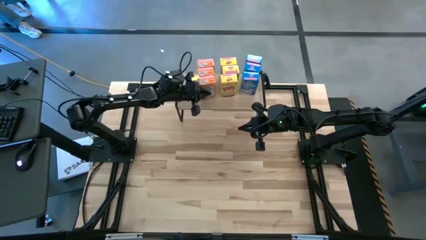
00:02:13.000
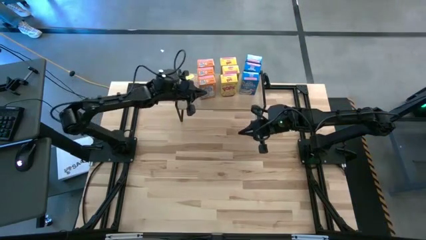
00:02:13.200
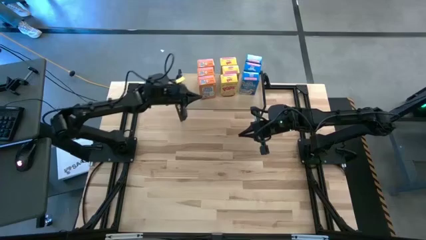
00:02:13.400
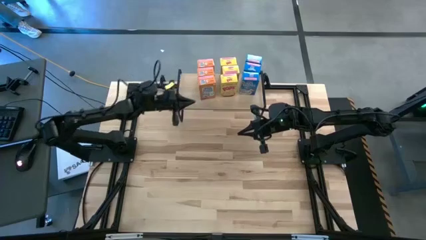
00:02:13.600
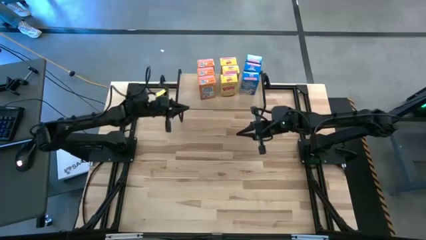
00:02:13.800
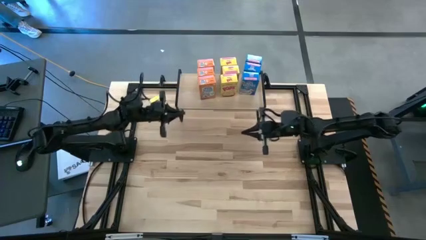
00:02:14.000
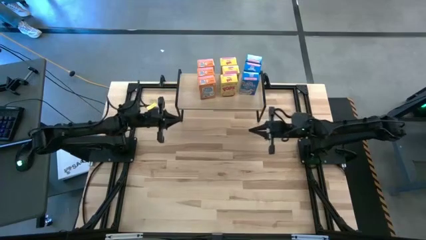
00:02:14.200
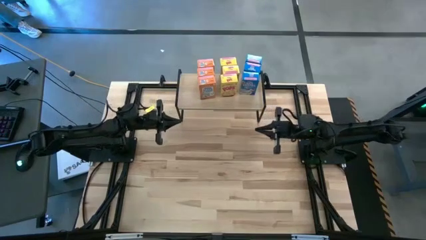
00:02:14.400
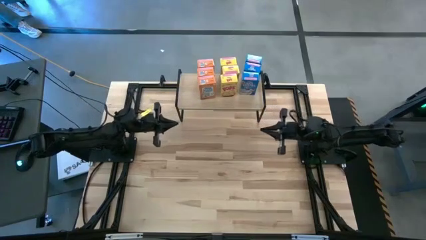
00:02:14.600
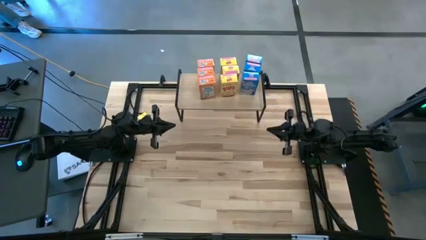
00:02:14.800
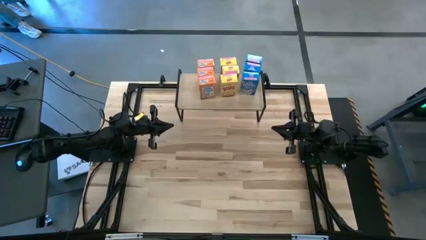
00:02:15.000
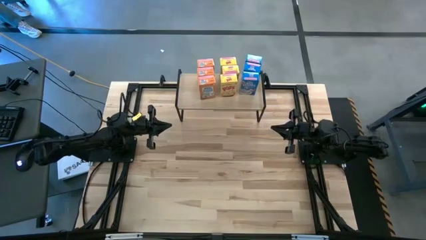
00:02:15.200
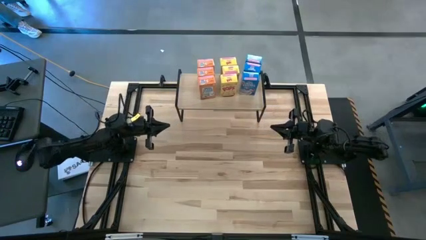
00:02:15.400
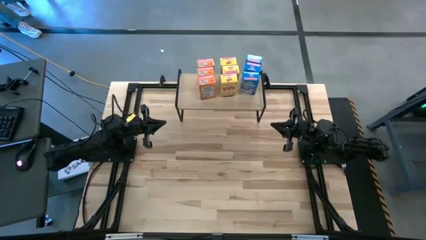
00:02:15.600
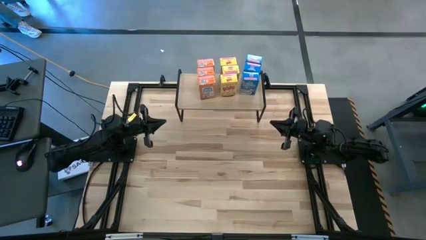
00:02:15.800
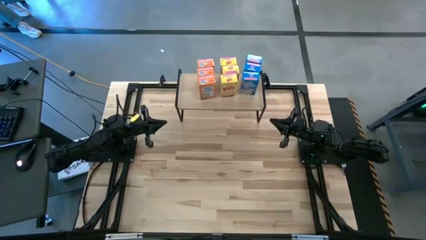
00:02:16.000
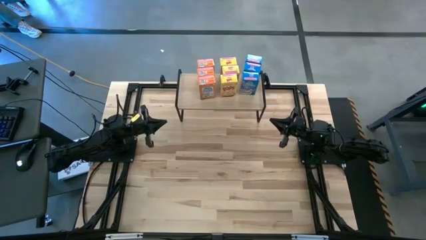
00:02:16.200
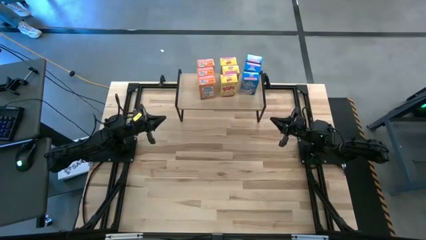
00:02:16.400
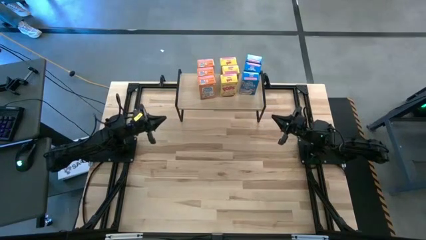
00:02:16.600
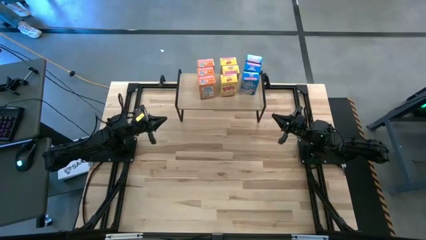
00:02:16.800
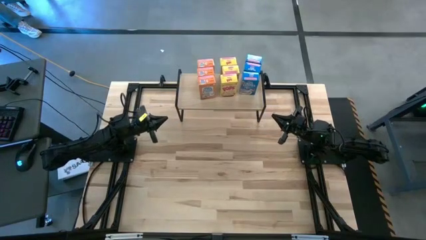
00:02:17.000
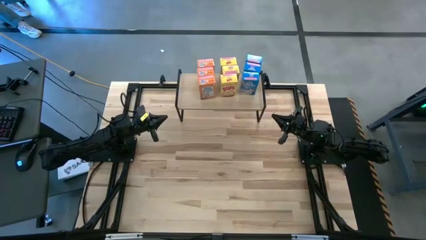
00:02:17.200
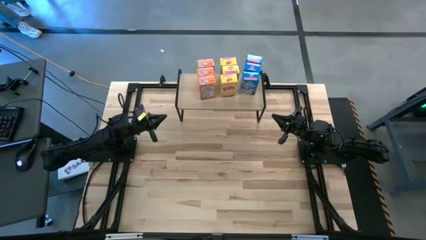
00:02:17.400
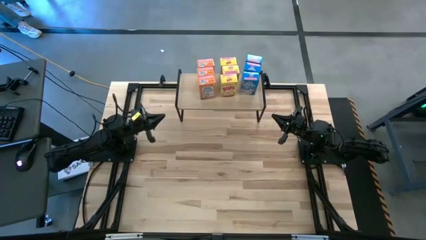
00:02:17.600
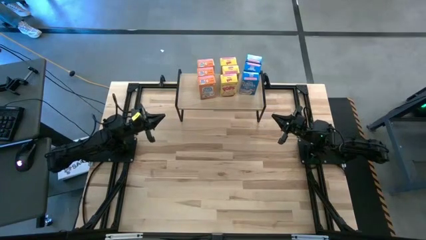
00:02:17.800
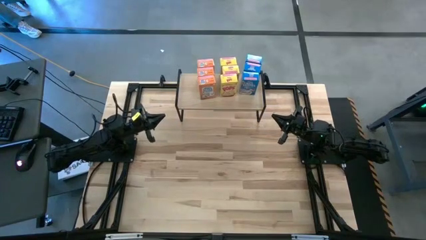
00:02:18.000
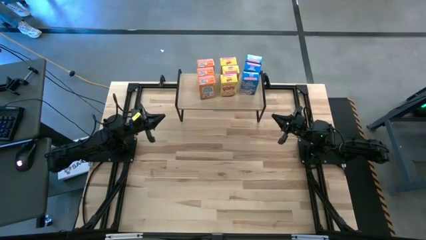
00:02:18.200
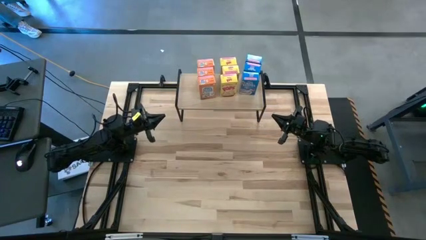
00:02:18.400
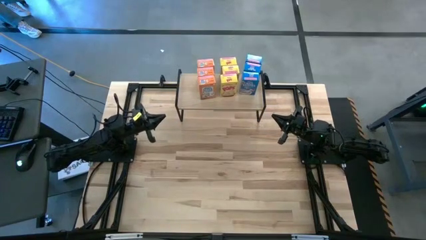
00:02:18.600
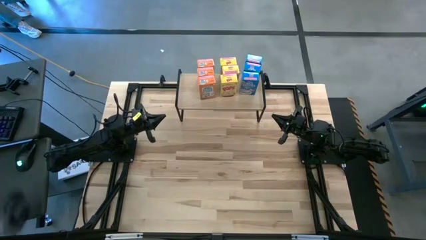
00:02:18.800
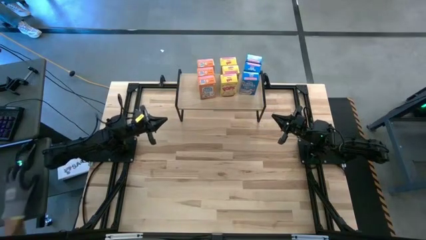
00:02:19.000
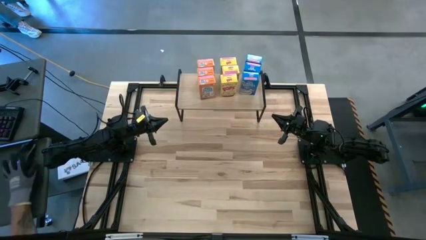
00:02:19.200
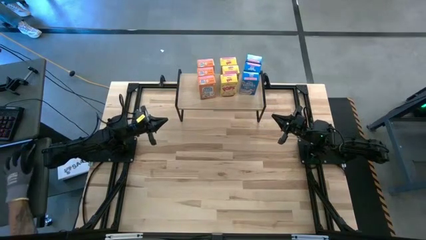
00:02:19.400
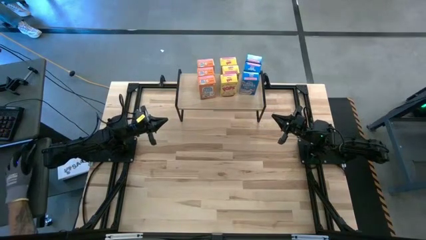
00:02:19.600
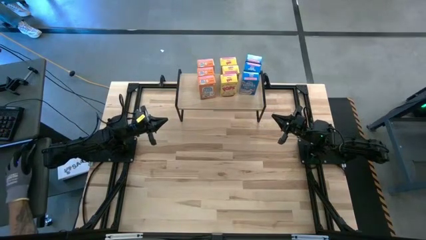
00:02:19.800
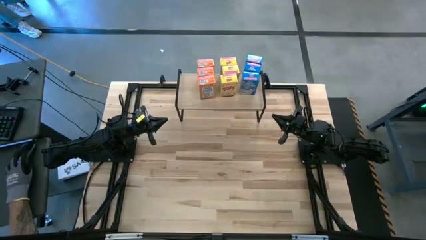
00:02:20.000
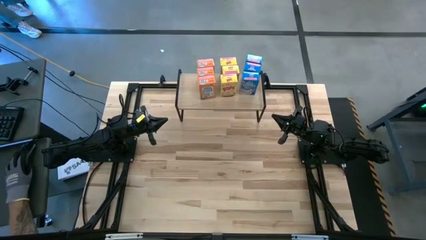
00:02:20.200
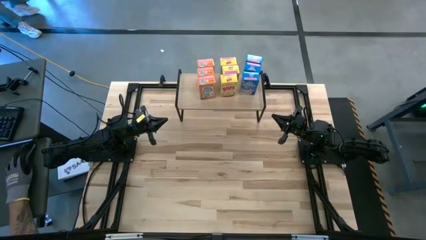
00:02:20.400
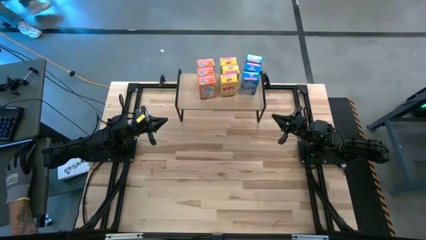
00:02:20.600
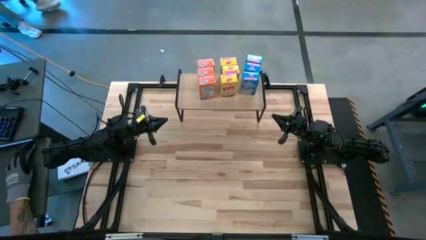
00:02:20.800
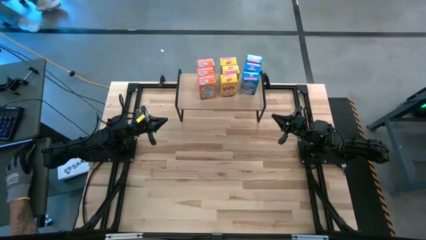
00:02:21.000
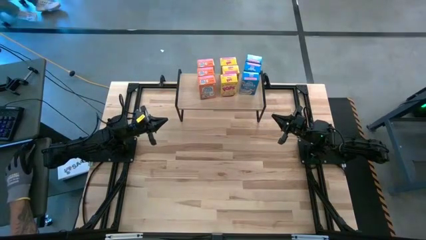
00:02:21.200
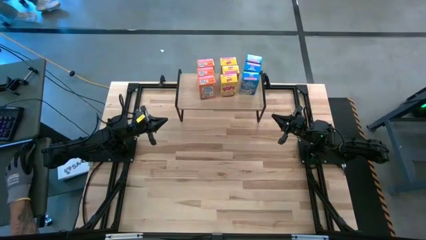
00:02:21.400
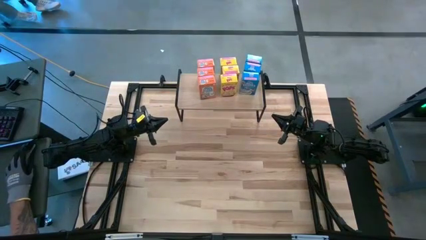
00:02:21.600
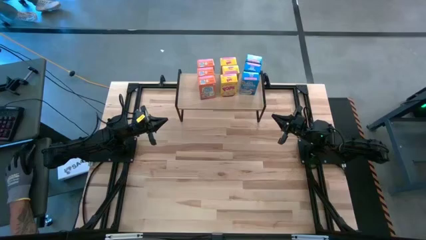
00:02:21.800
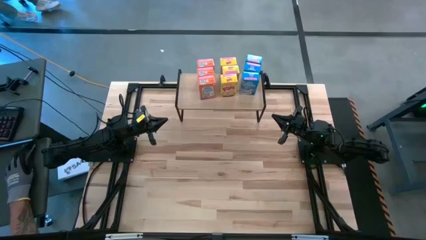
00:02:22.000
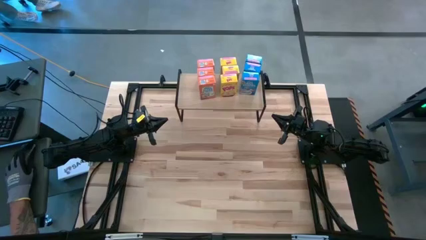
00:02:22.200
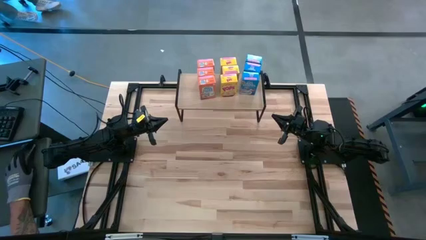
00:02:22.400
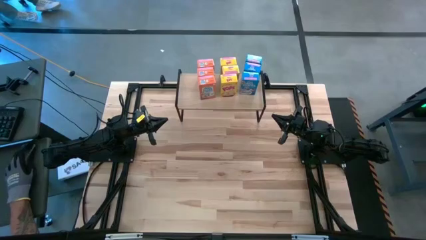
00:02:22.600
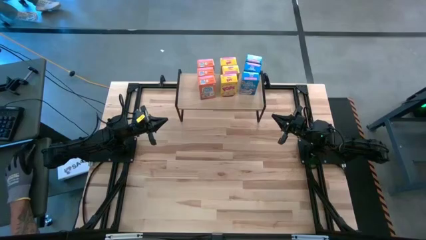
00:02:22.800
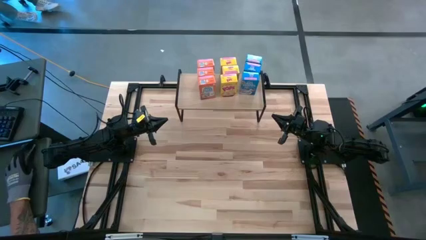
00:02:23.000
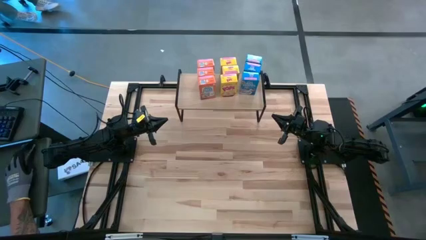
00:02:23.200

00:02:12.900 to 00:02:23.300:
Task: Stack cereal on shelf
Return to Home Position

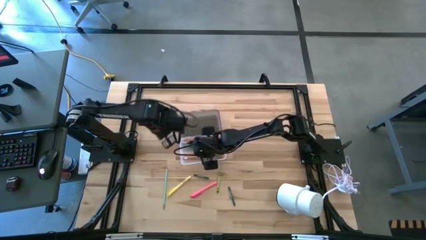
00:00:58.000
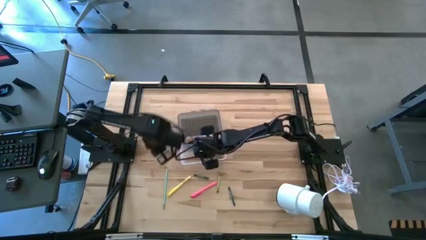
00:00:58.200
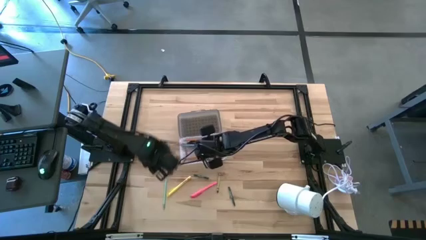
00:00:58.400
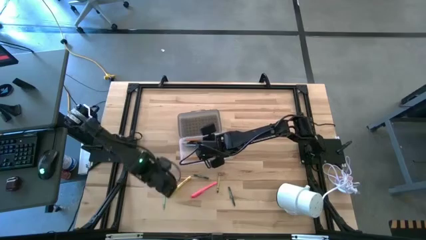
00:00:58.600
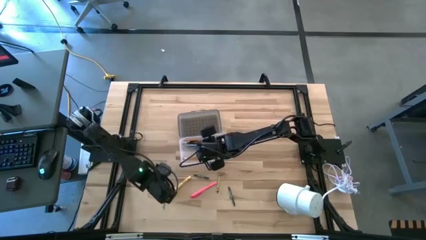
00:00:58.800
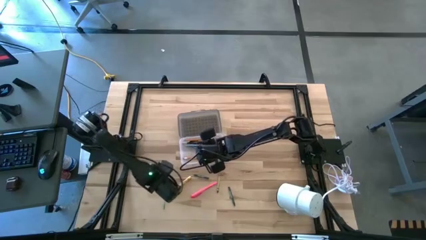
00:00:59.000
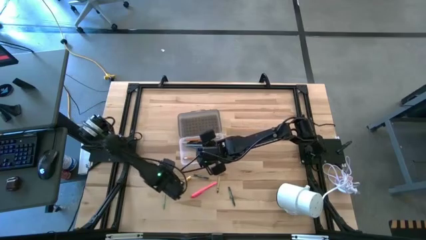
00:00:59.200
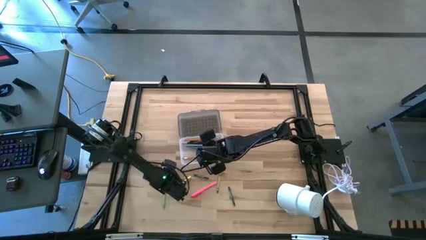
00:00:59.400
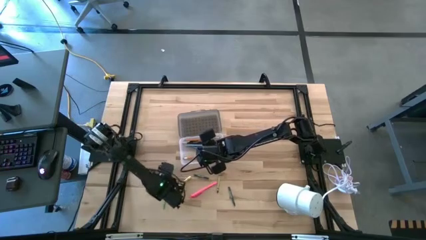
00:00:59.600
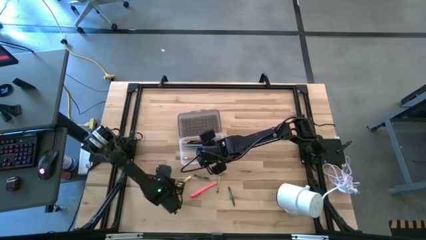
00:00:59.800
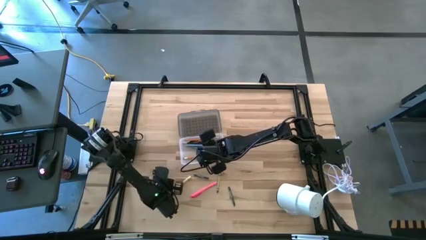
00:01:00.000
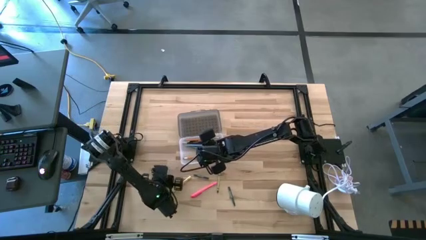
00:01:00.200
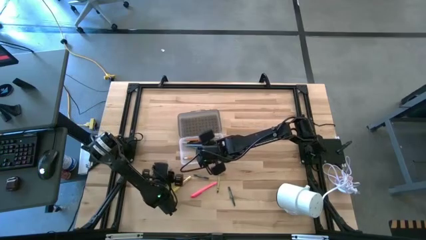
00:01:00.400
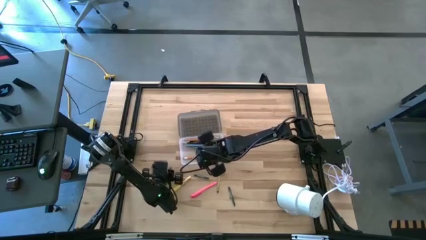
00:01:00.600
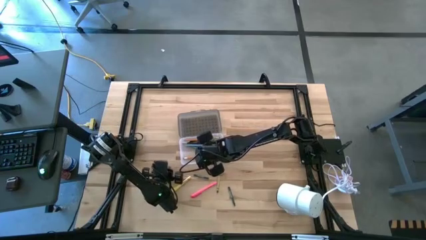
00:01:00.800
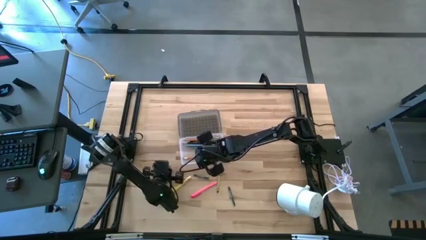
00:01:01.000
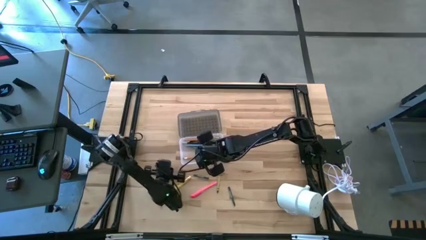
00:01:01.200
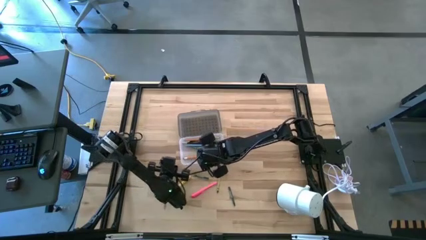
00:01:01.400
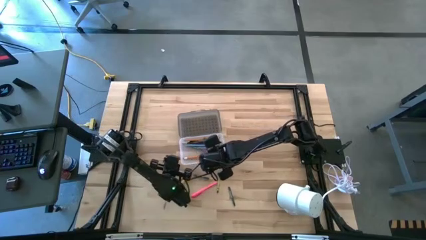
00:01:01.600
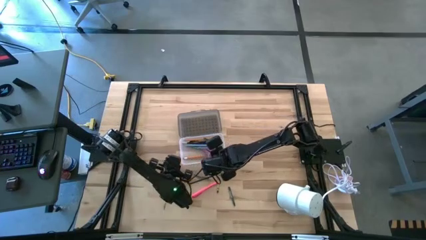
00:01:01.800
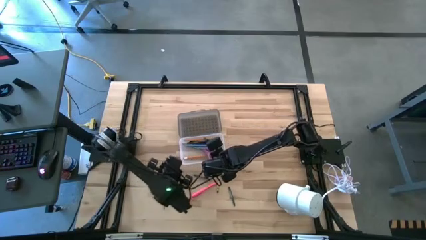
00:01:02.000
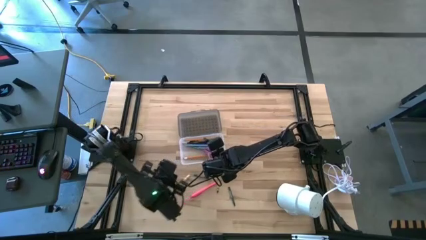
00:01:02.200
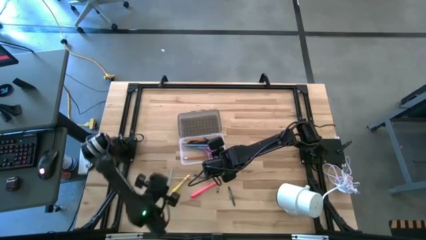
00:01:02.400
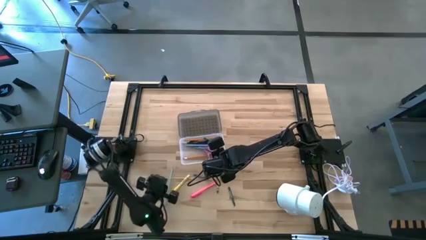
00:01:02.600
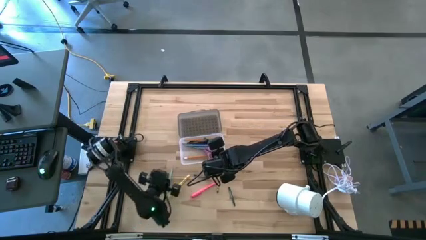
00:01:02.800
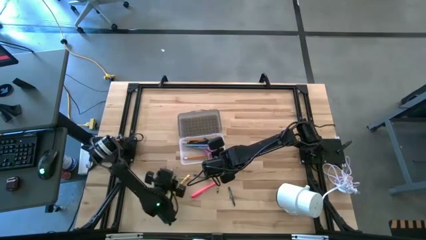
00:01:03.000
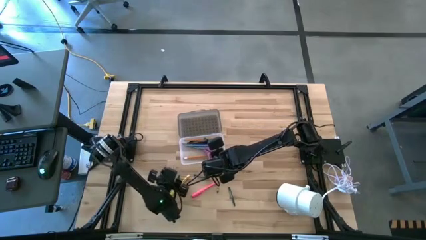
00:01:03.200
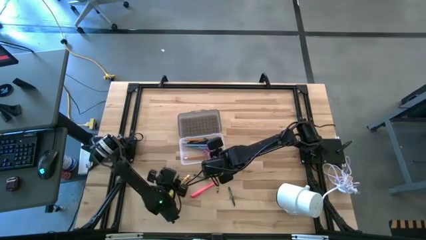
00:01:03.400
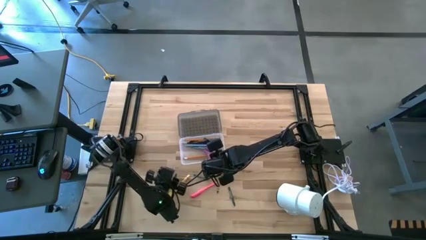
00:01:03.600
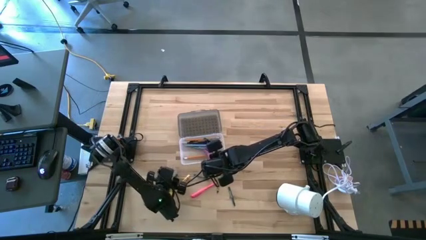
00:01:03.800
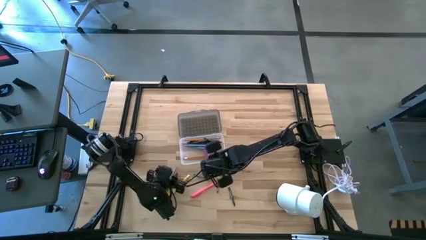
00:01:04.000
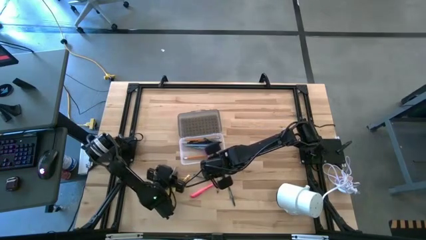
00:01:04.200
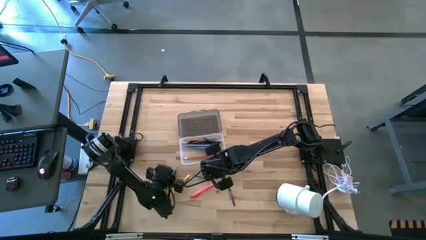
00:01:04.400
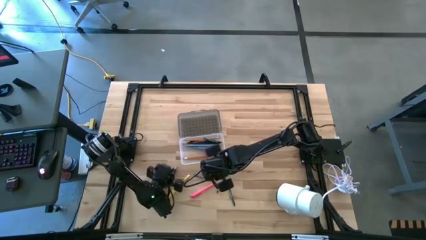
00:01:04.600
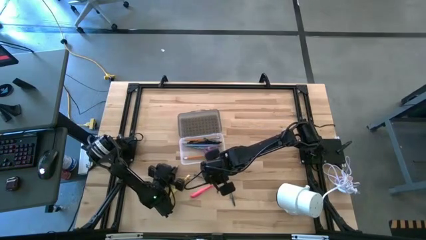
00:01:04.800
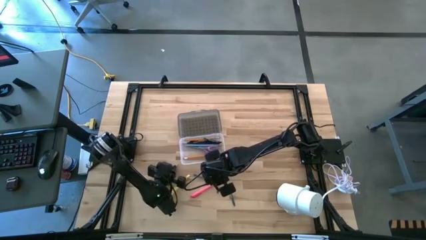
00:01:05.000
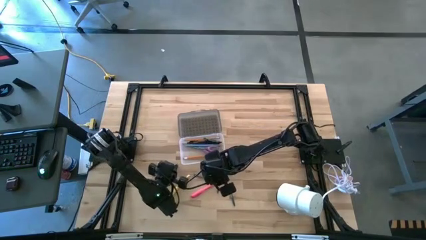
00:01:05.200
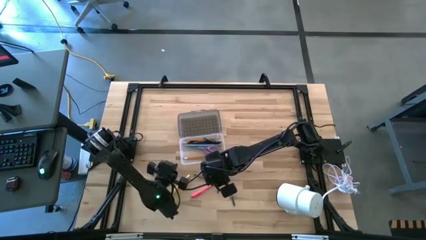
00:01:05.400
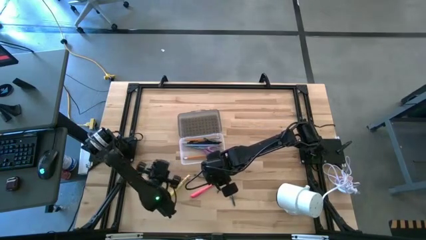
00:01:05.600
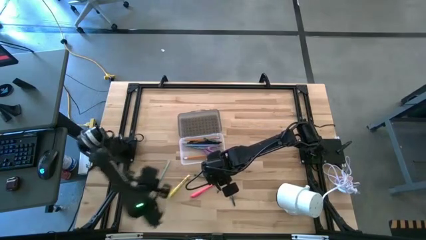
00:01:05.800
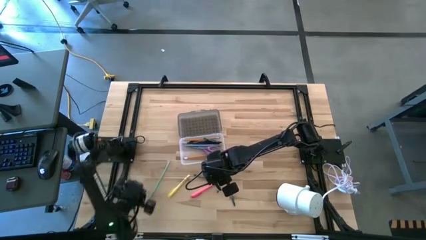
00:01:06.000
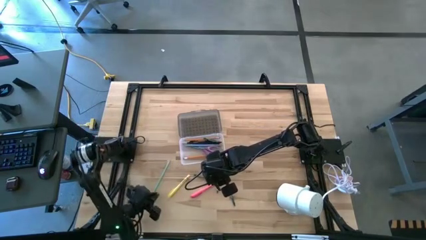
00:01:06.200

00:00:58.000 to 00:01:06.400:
Task: Pick & place school supplies into a supply box
Put the blue pencil into the gray supply box
